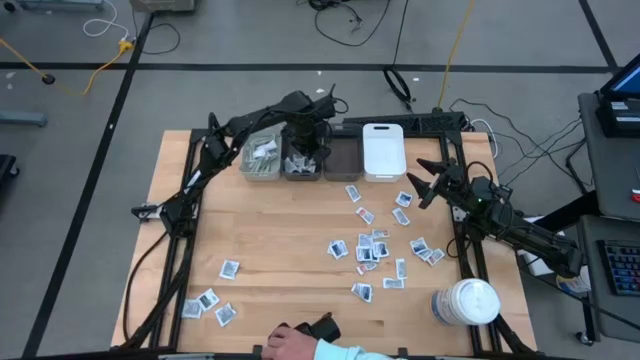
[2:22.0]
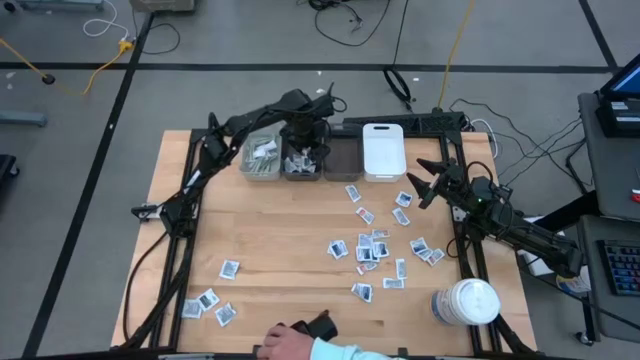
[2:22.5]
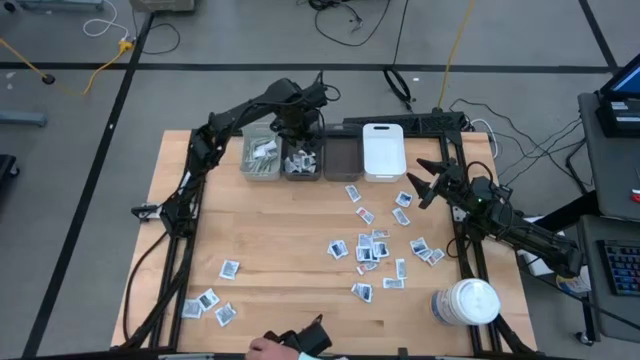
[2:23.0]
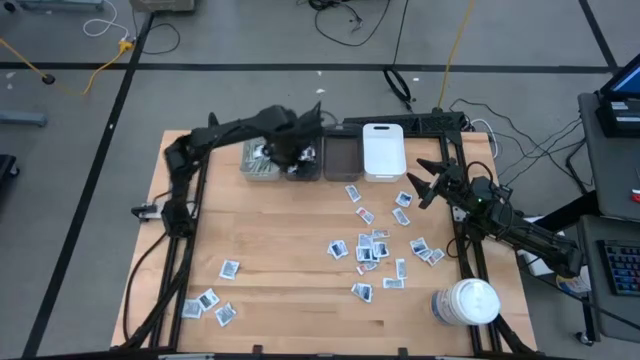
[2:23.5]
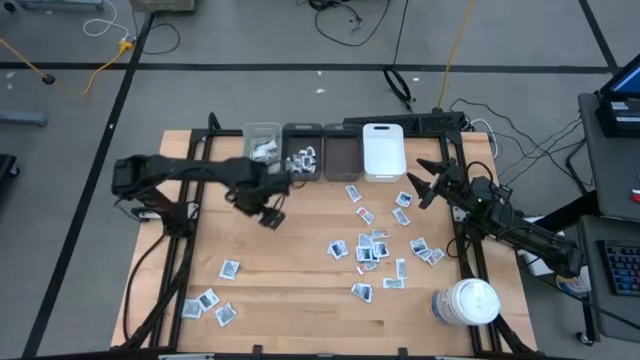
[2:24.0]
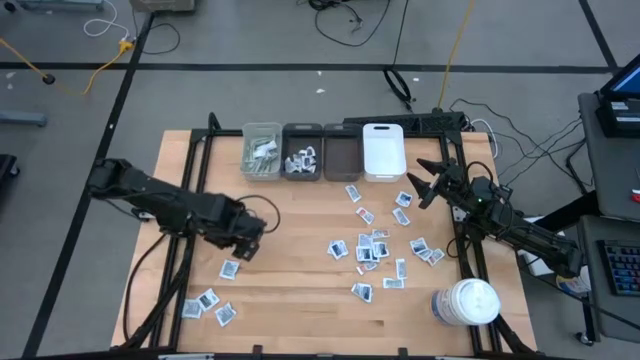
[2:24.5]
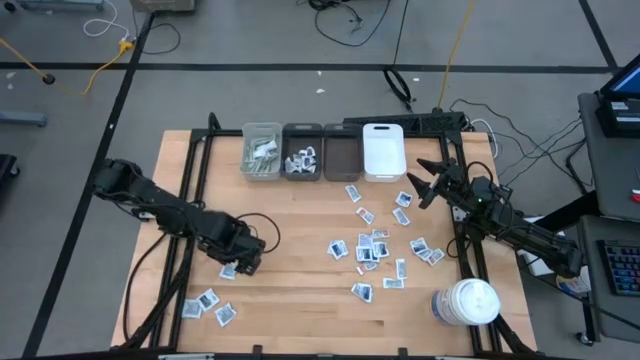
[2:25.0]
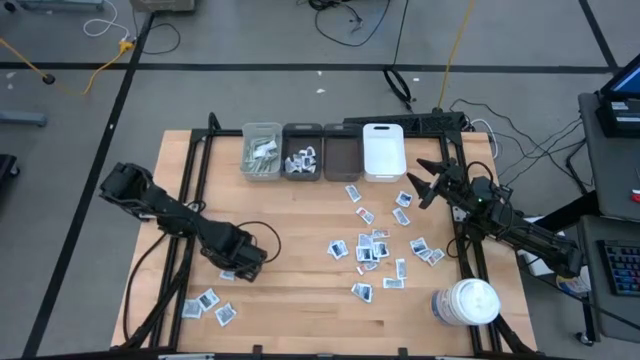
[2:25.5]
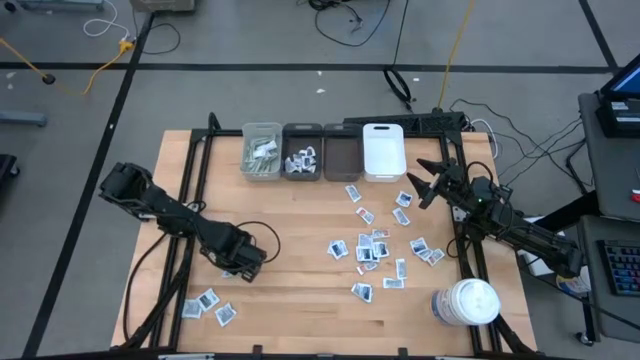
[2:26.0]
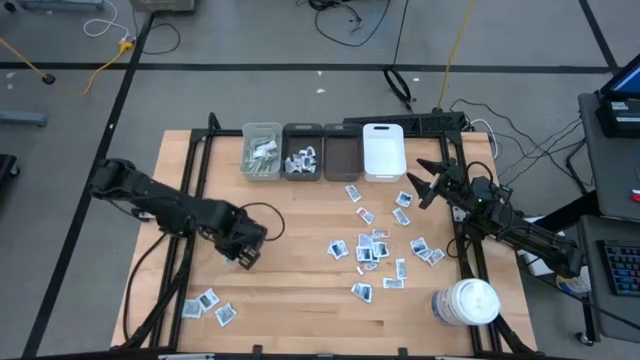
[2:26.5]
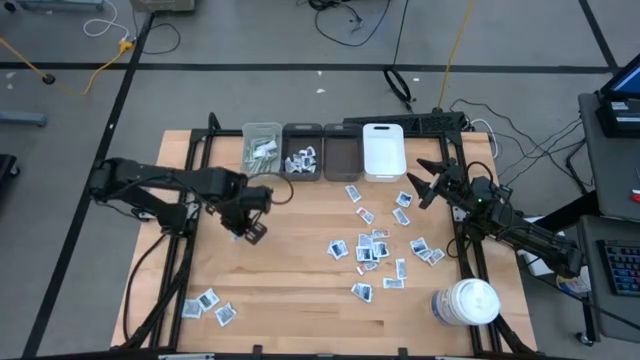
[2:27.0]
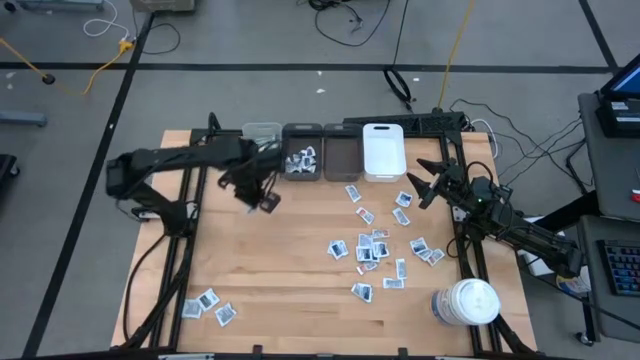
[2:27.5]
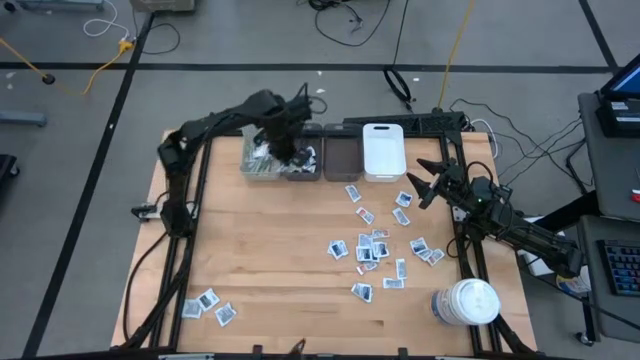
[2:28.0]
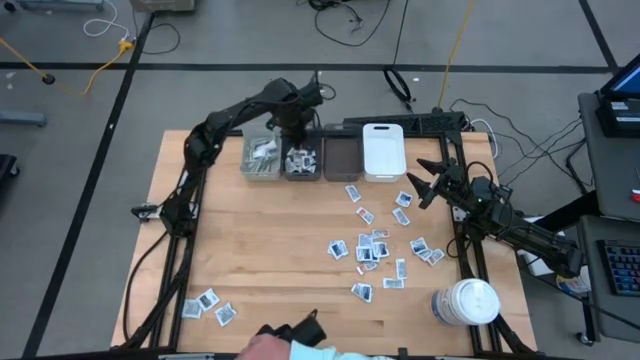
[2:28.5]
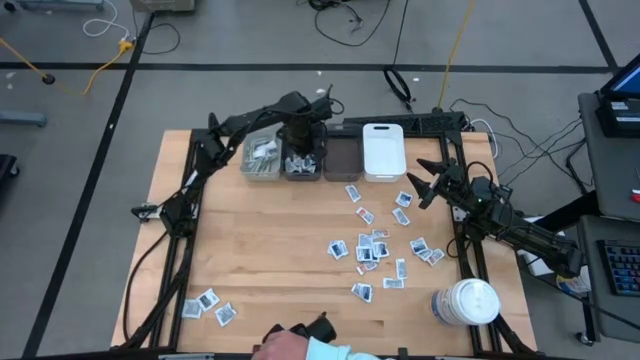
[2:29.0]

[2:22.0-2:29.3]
Task: Pick & Place First Aid Supplies
Put the towelette pack into the left black bin

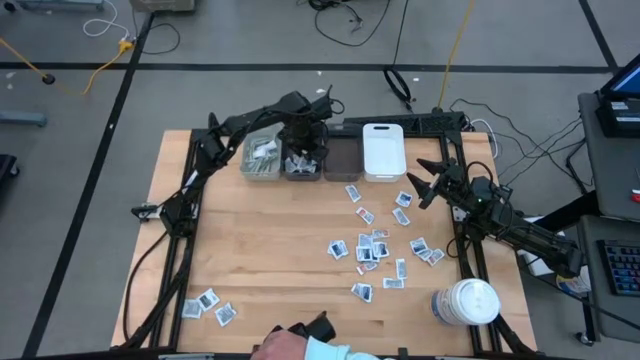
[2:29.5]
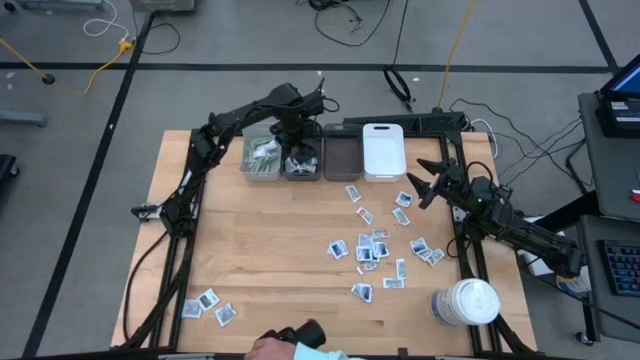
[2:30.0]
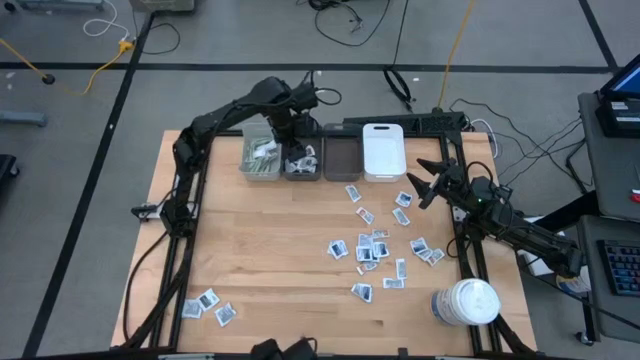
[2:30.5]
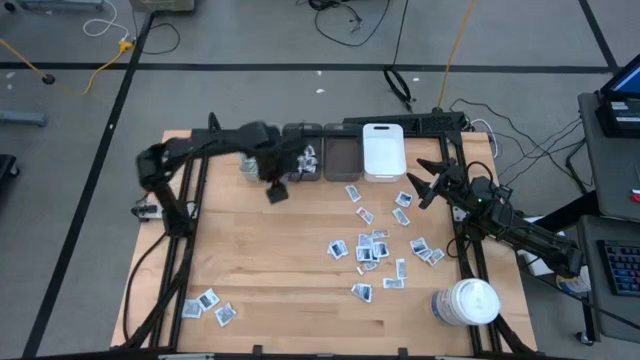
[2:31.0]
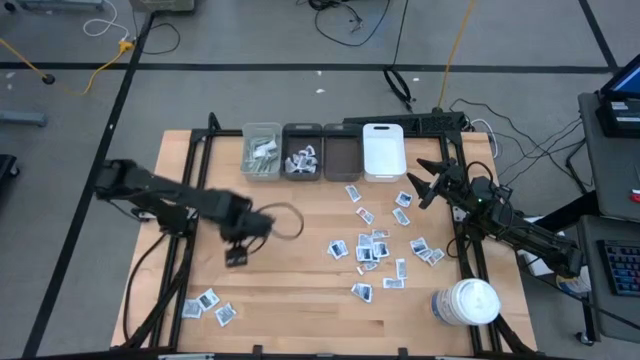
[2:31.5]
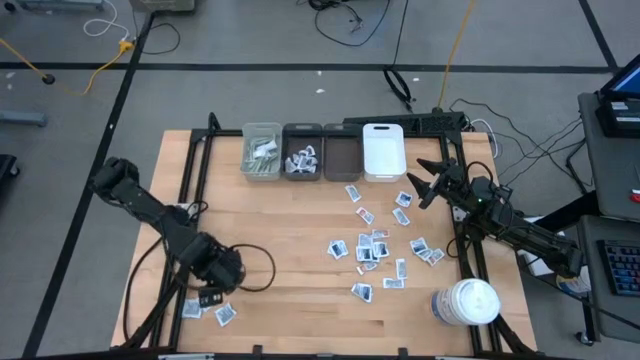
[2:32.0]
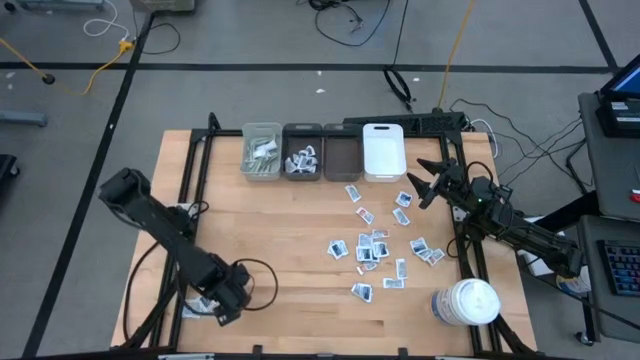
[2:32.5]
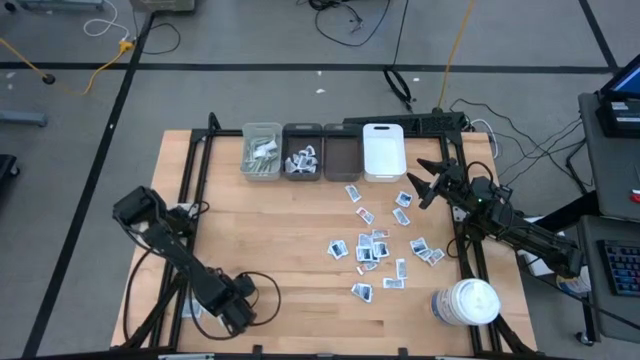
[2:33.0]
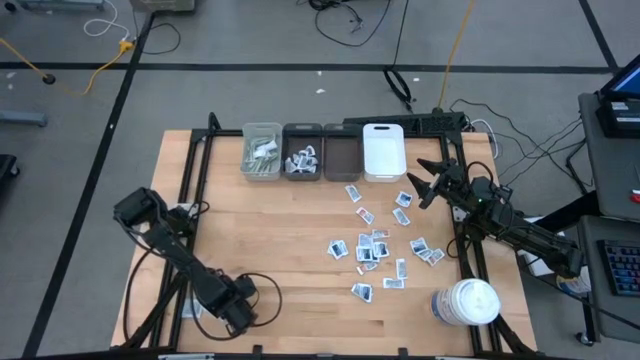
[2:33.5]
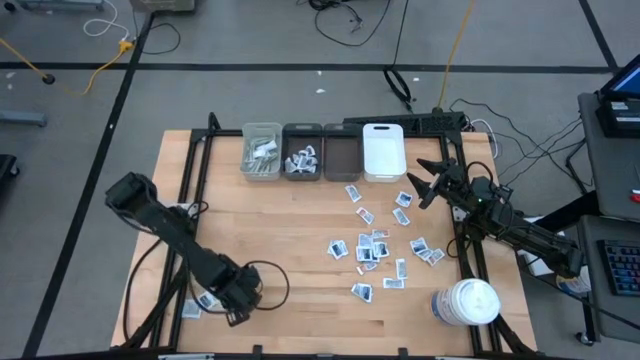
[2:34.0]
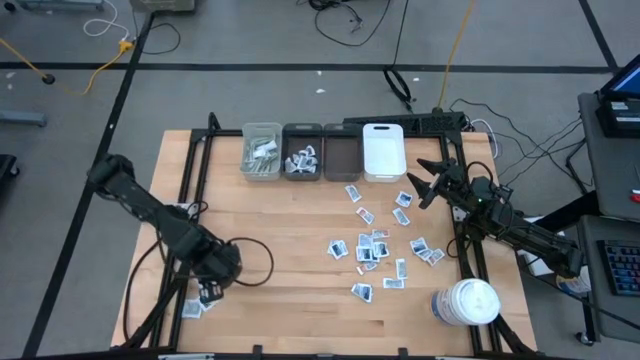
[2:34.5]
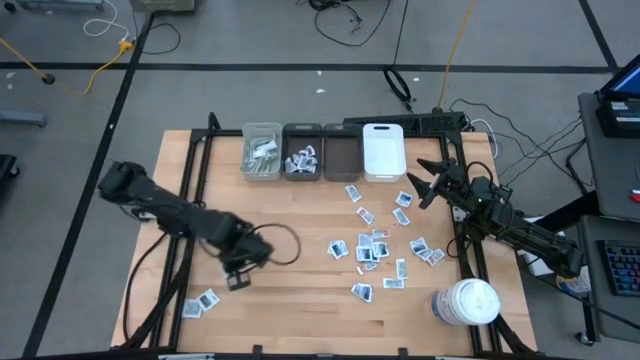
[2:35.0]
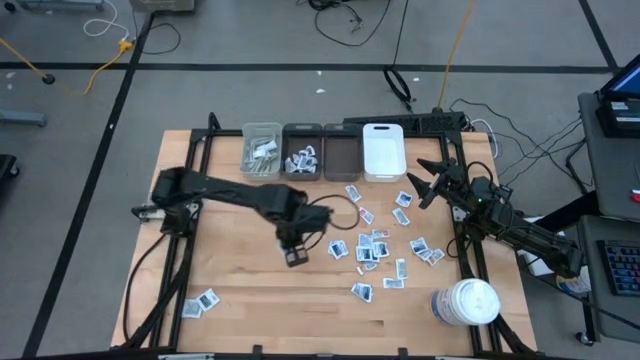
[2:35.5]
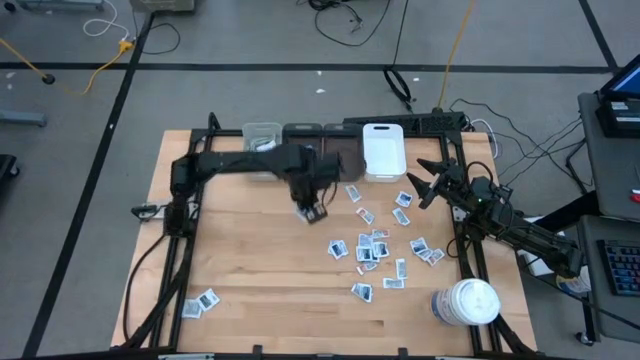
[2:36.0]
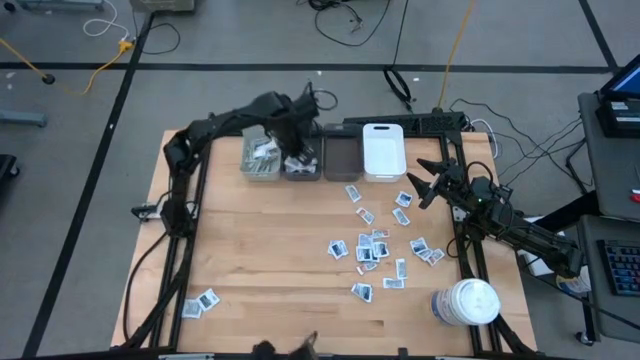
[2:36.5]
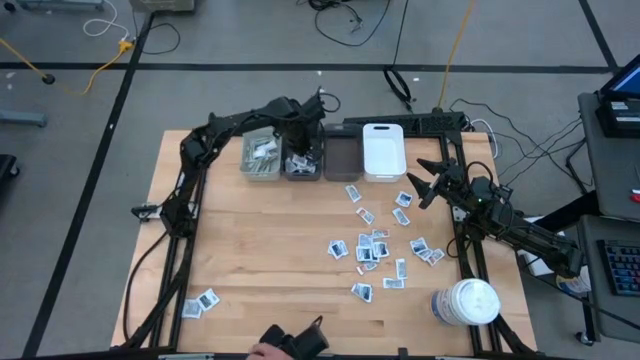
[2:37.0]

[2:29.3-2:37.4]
Put the towelette pack into the left black bin

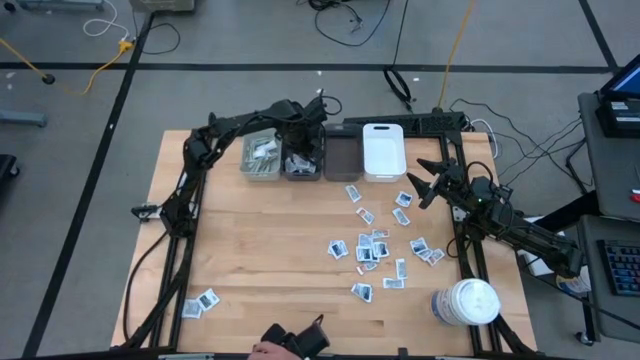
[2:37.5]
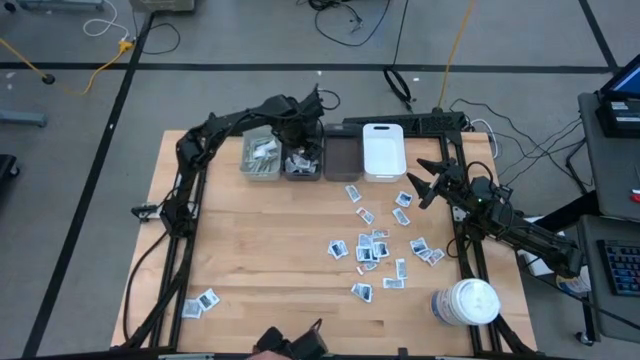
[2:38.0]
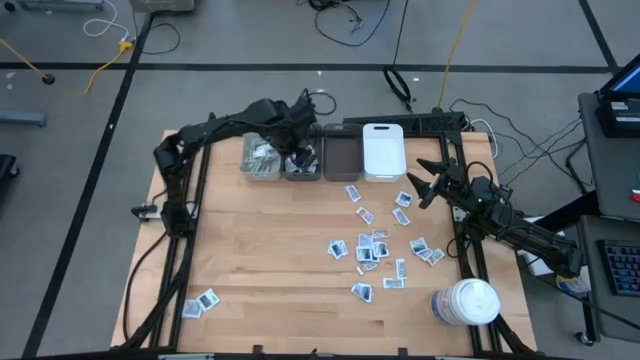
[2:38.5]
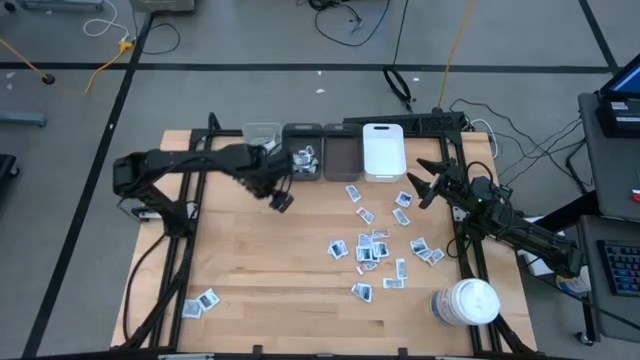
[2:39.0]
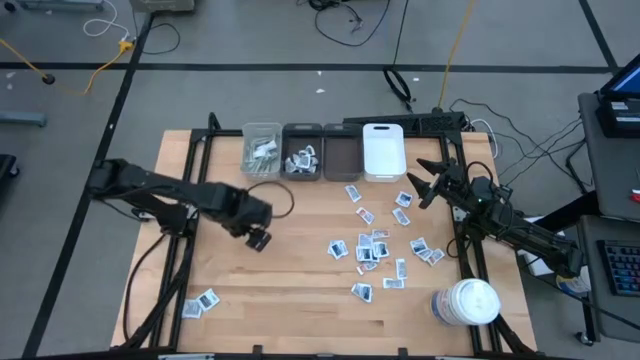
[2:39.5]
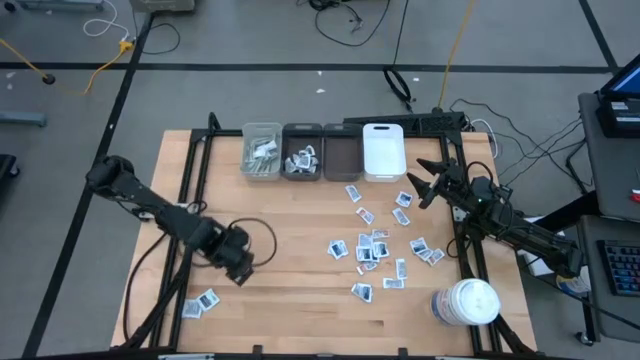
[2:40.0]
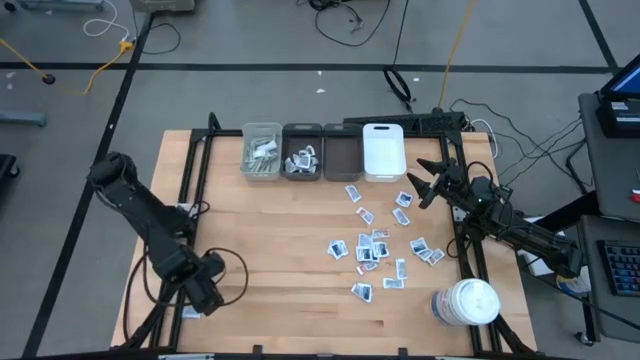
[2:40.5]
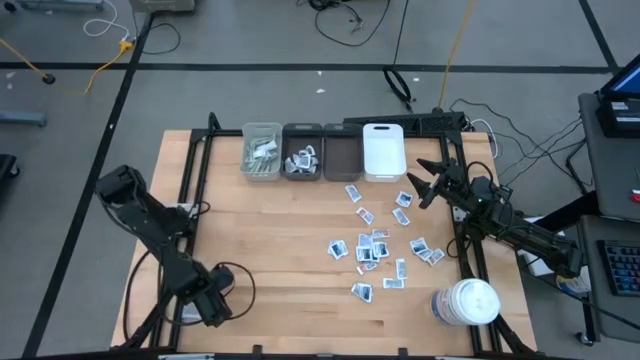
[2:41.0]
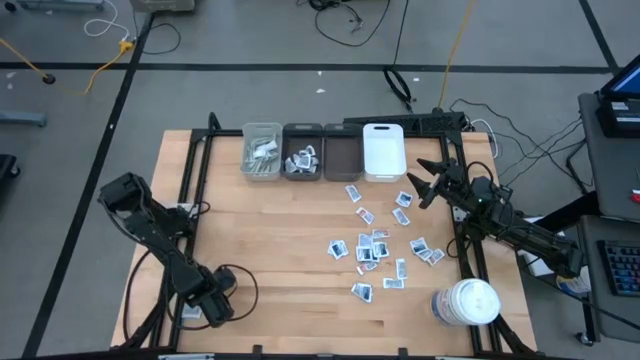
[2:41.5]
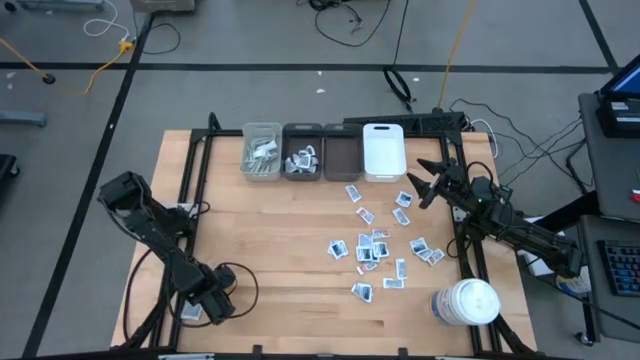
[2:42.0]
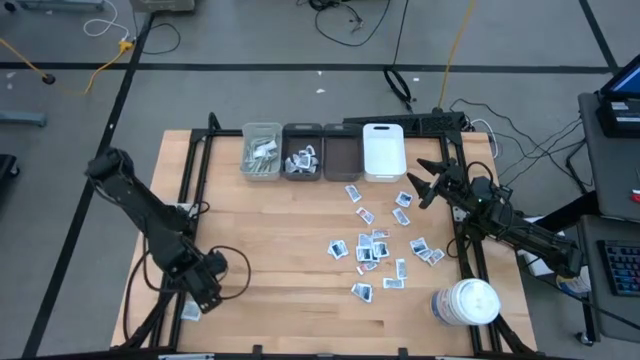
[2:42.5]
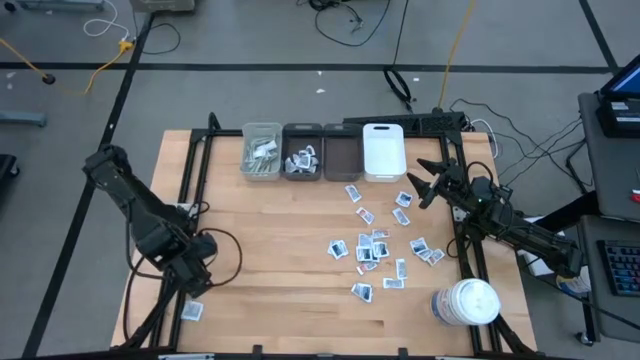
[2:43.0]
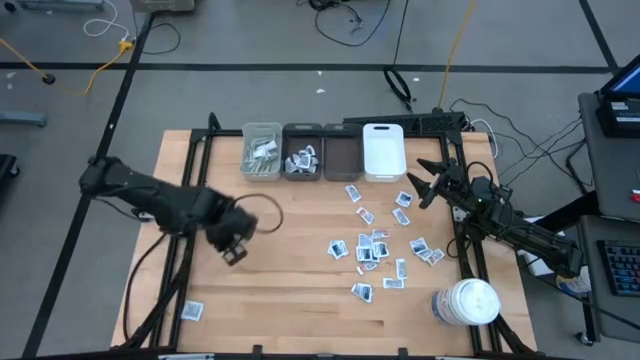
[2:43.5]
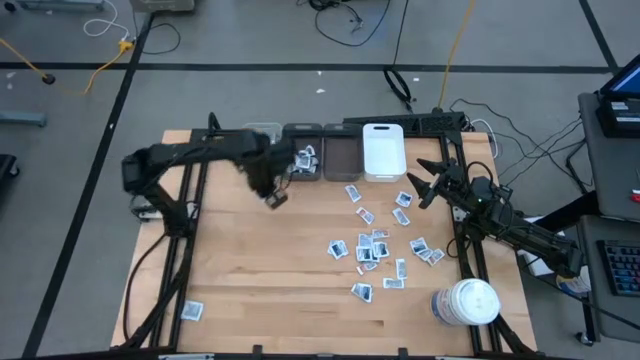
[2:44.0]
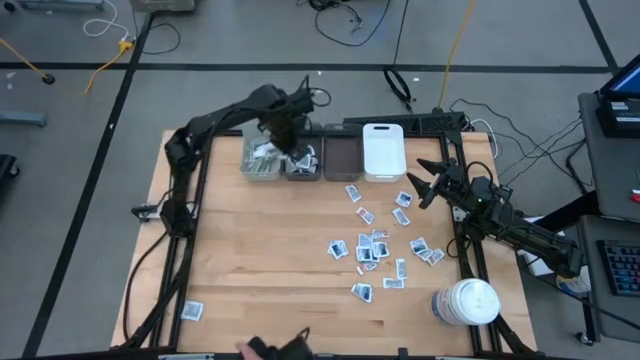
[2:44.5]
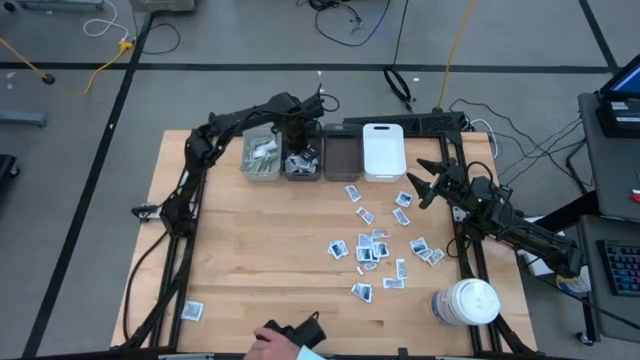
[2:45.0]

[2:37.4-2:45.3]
Put the towelette pack into the left black bin
